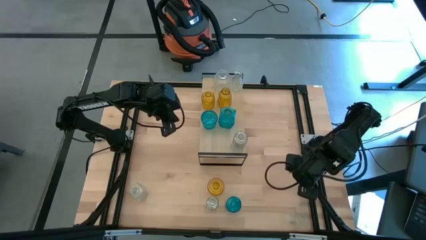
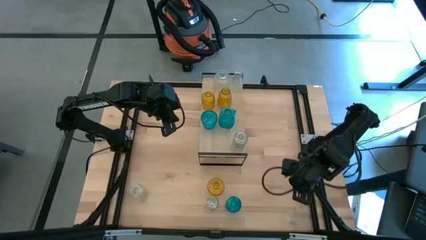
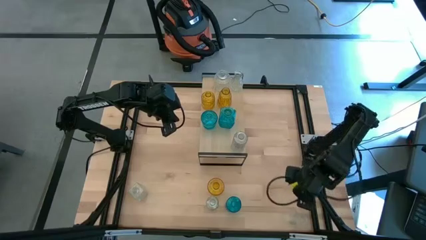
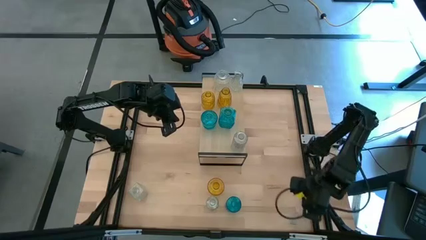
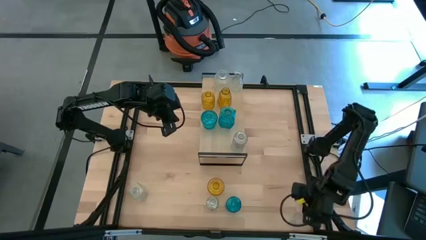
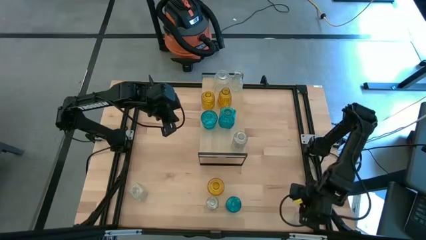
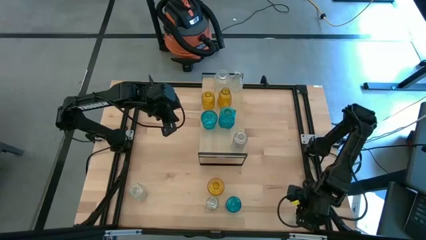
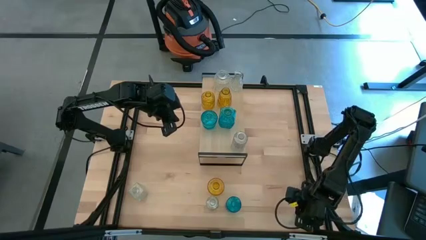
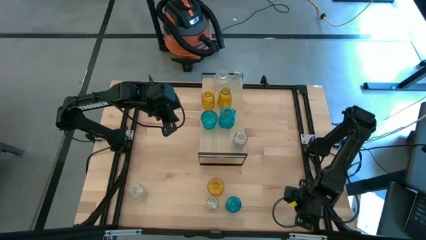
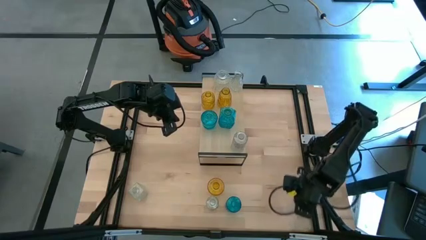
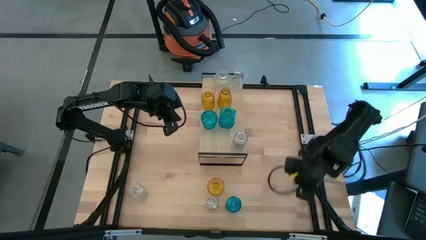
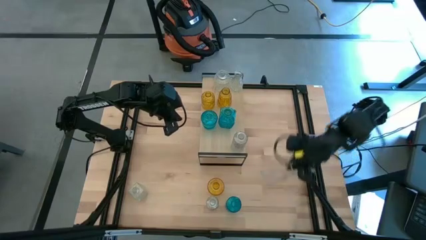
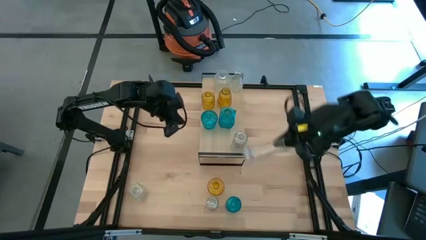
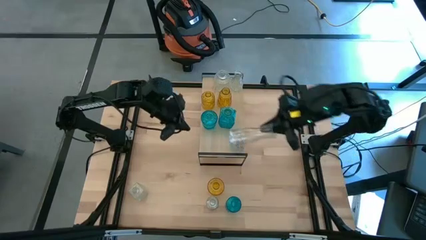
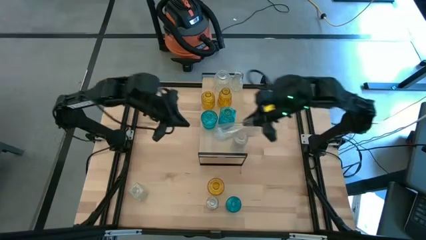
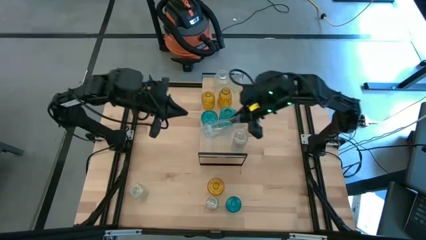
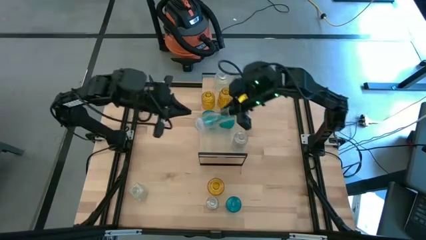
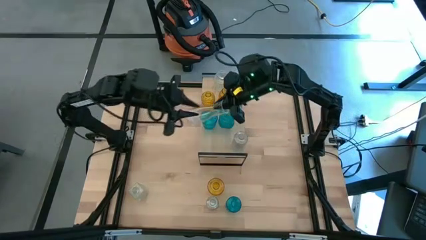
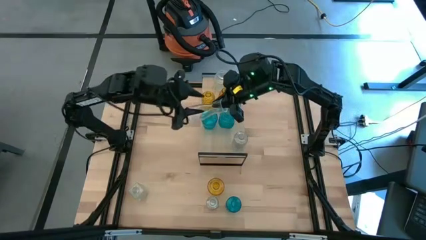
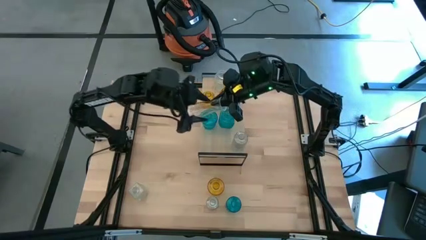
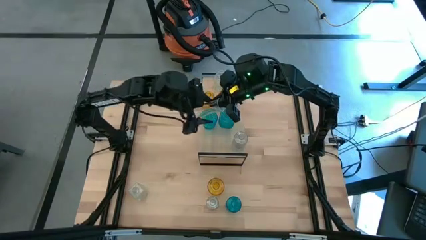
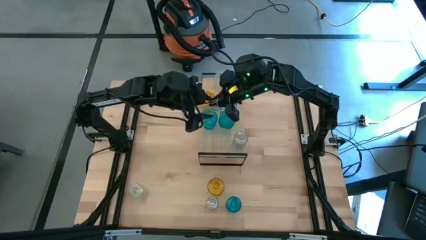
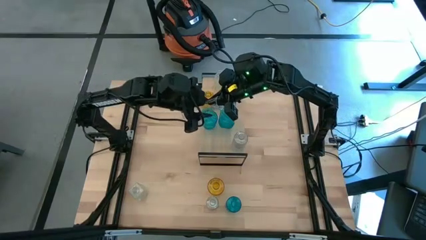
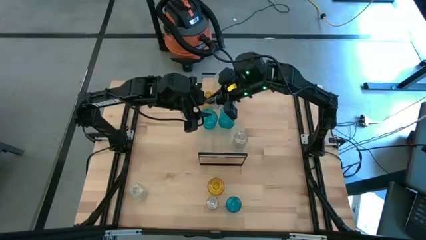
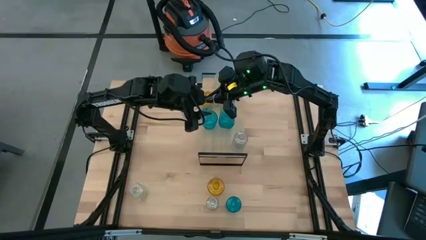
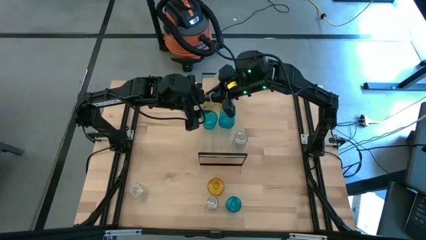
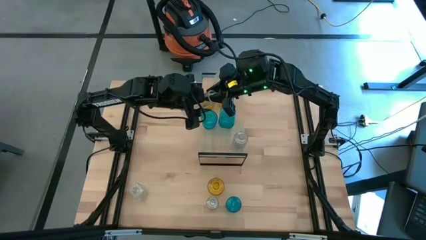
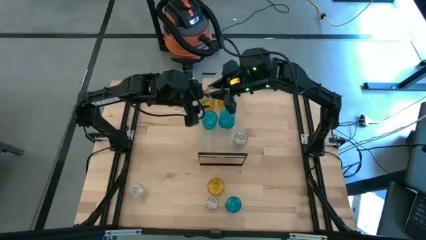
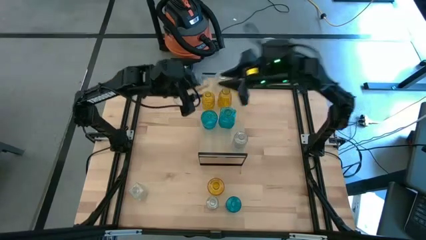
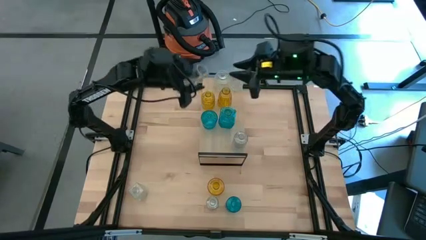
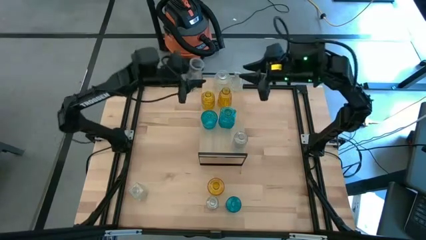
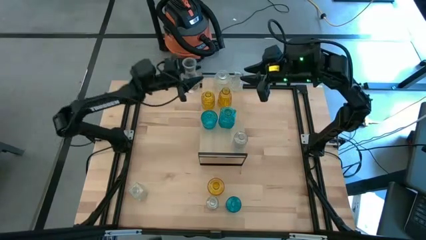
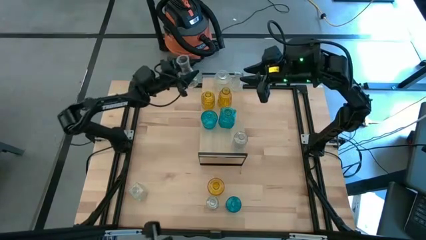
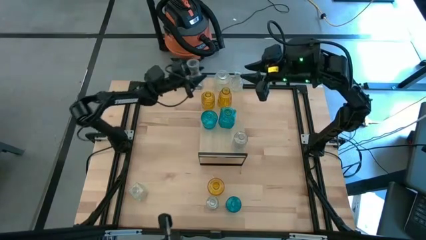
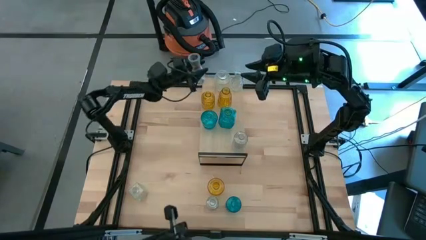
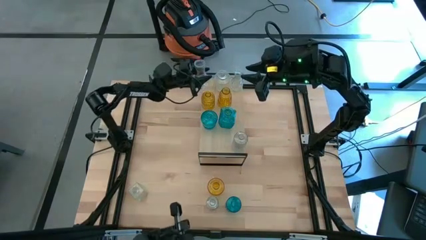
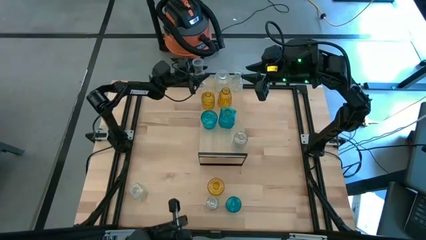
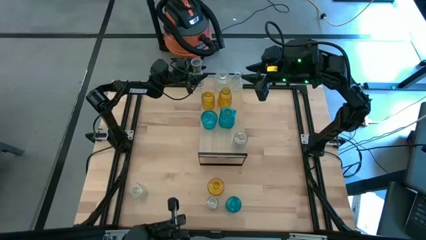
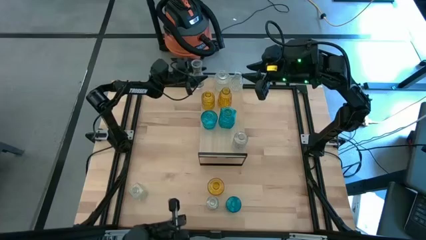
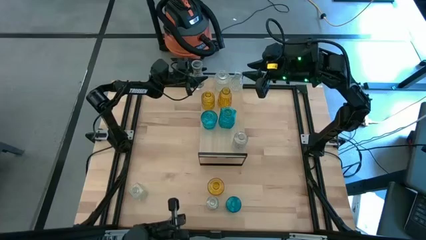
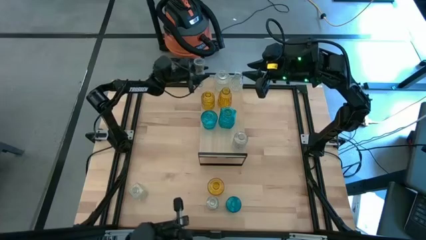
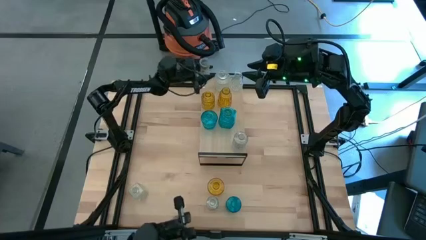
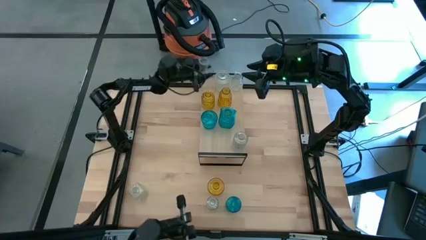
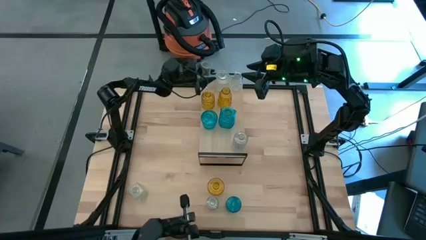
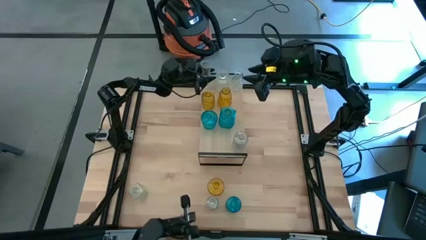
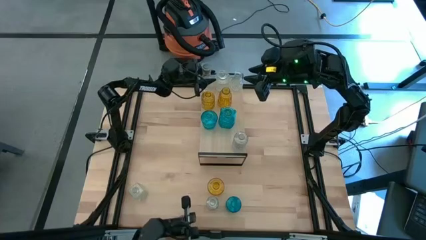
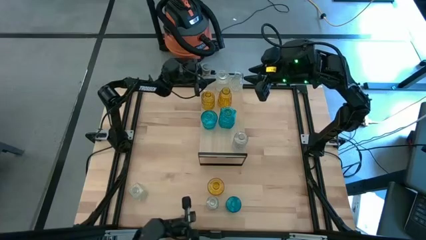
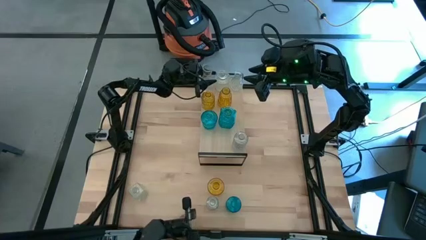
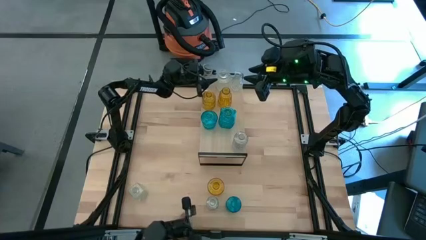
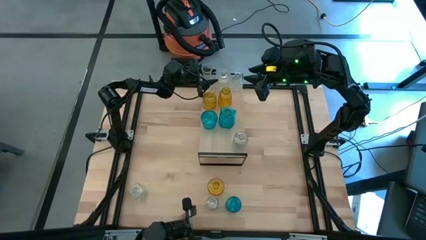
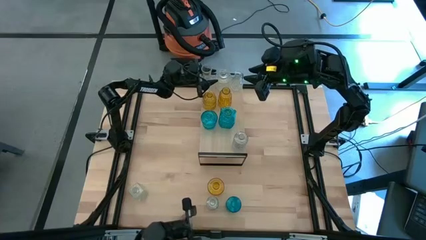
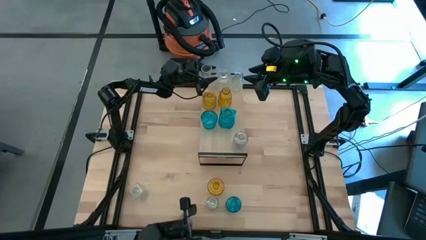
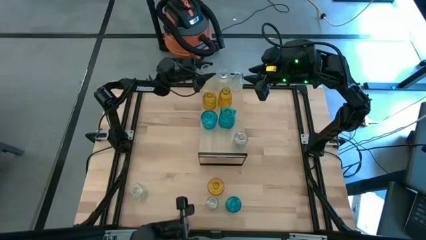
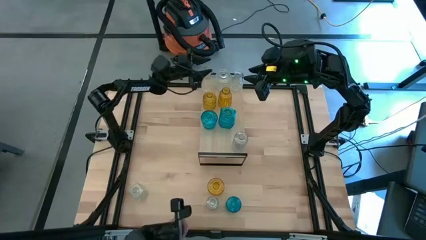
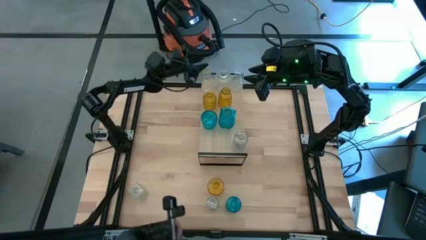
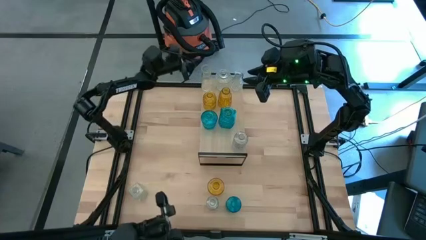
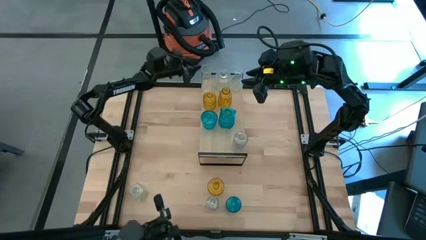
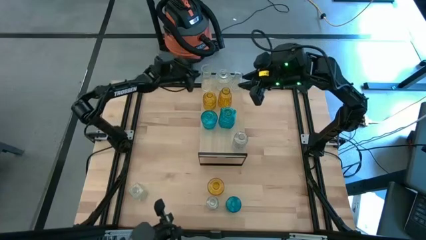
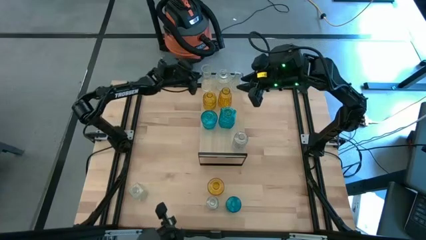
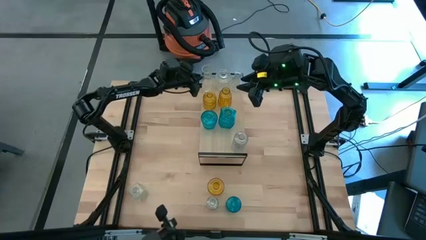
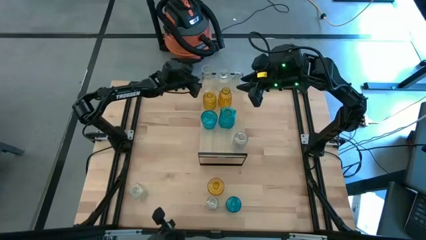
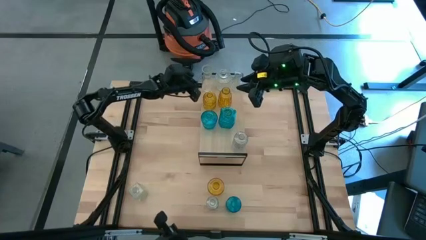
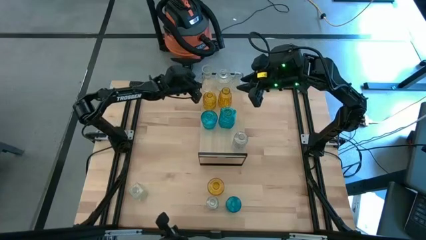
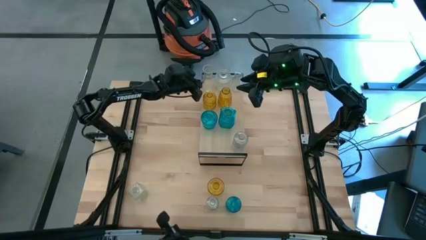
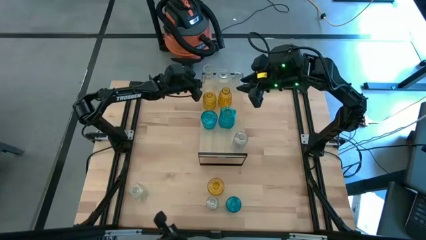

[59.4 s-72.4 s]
Task: sort vases onto shelf
Put the transparent vase on the shelf aligned with the other transparent vases

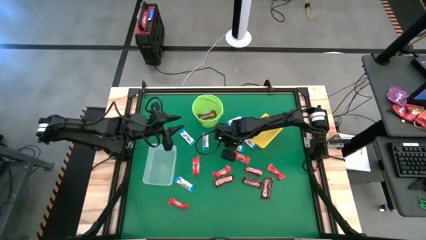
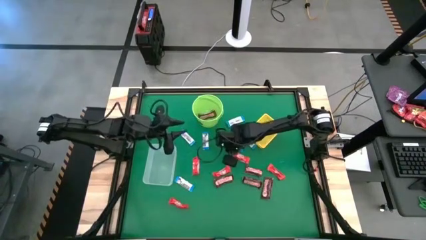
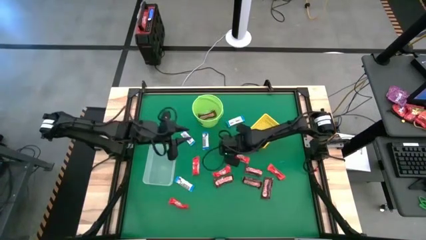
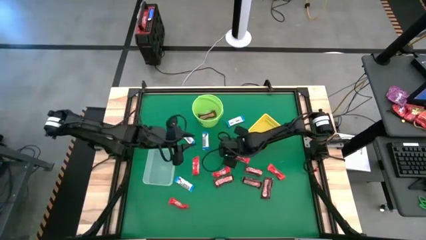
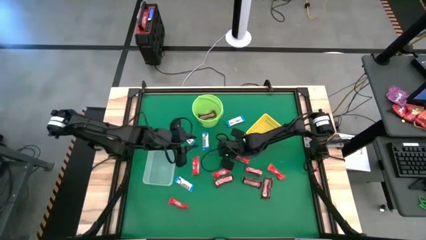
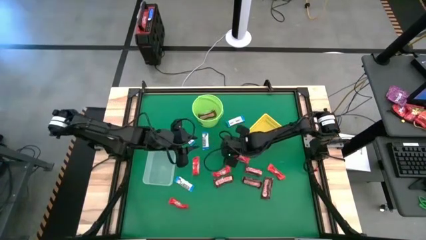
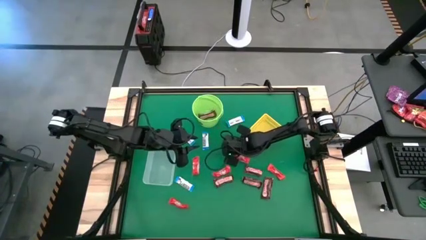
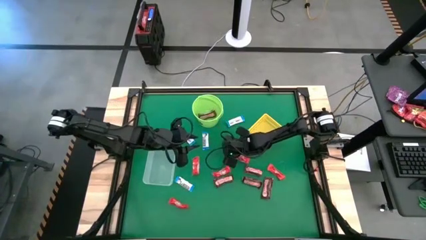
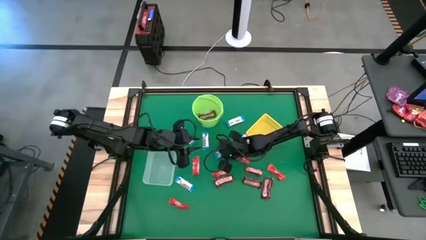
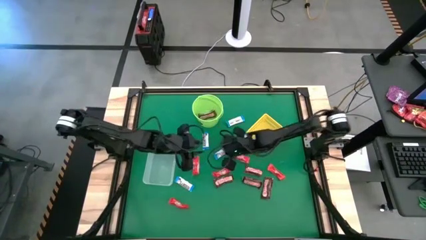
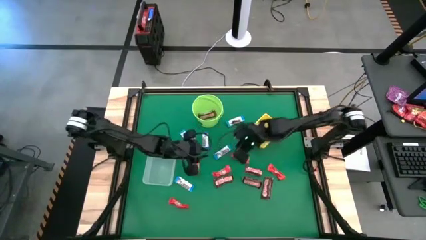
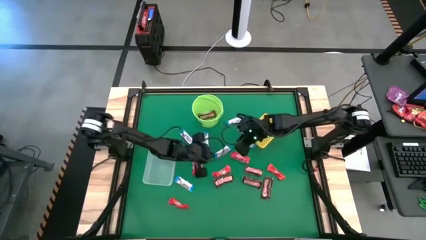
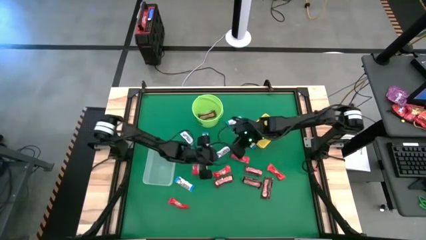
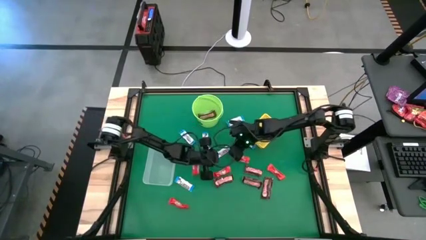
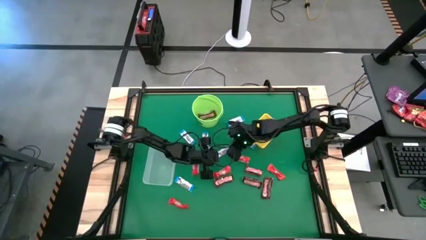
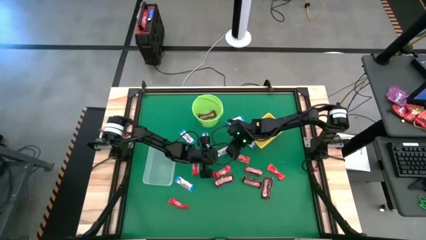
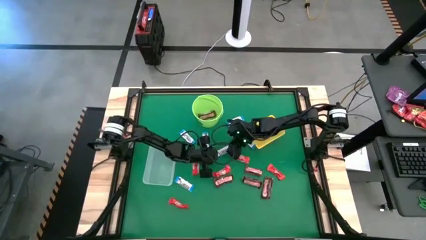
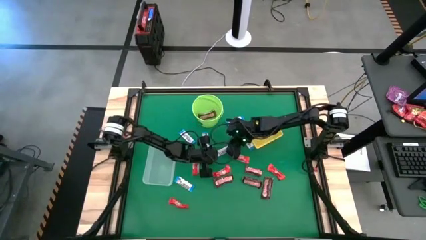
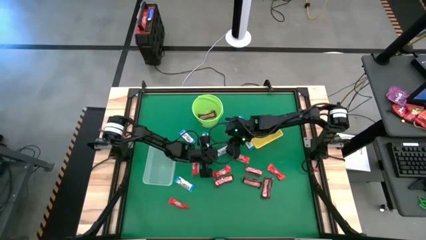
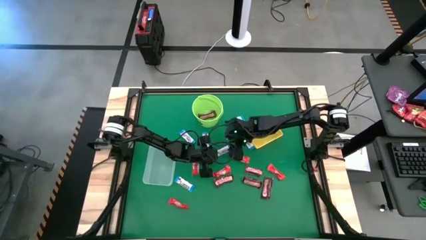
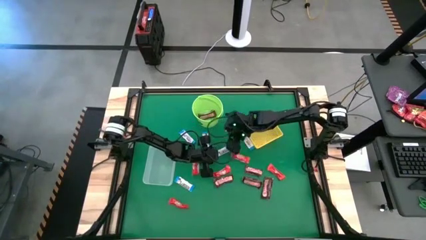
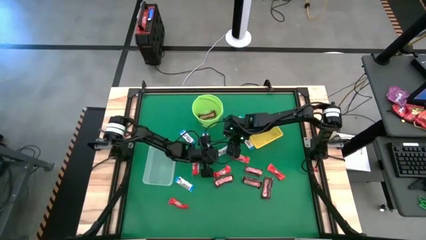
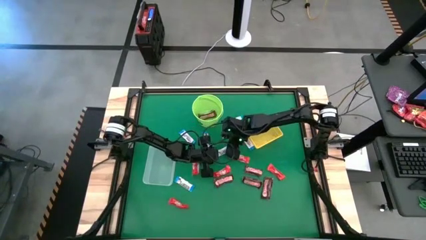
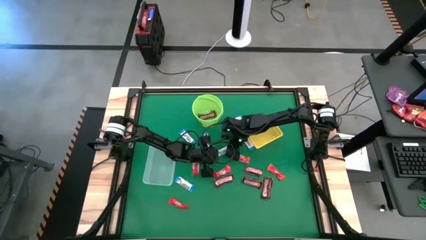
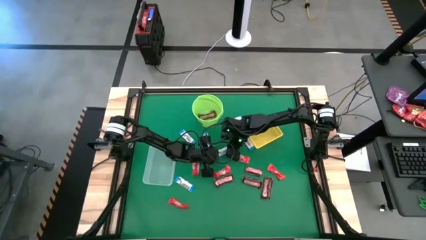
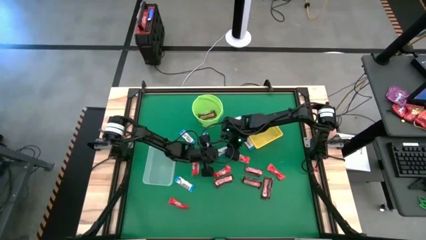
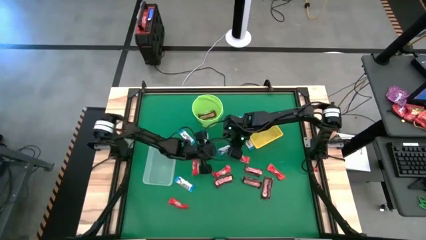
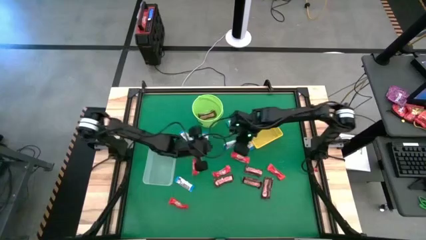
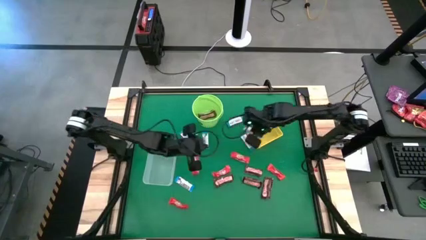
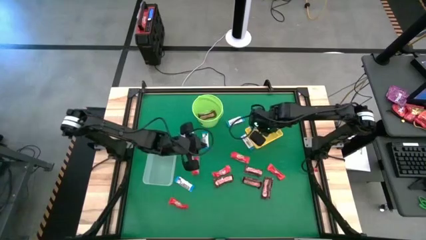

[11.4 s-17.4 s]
Task: Sort candy by brand, put in halloween buckets
Put the white chocolate bar into the yellow bin
